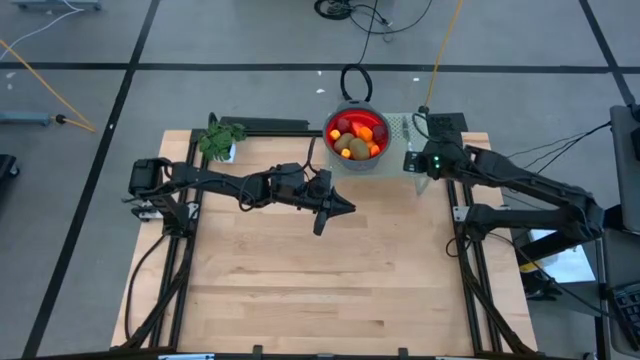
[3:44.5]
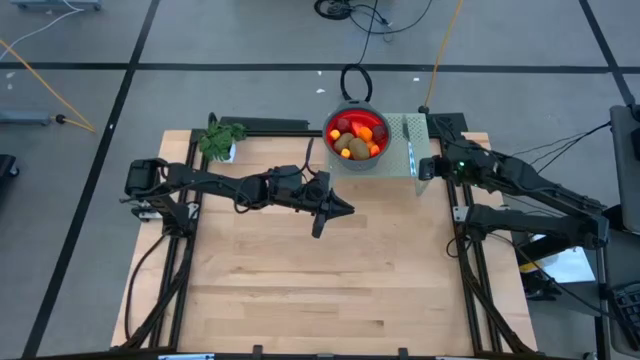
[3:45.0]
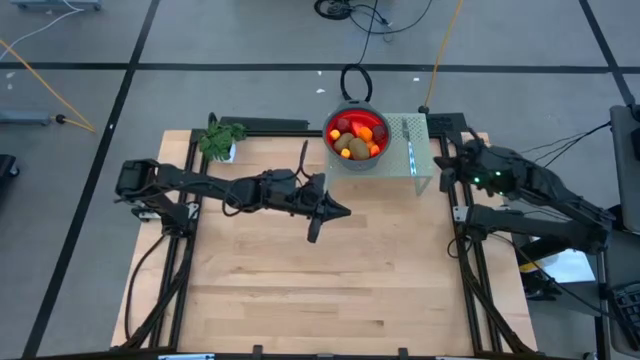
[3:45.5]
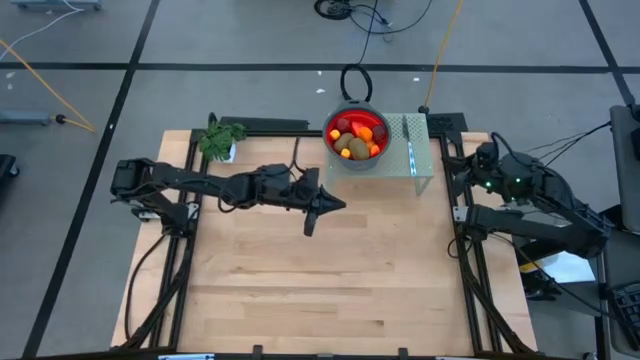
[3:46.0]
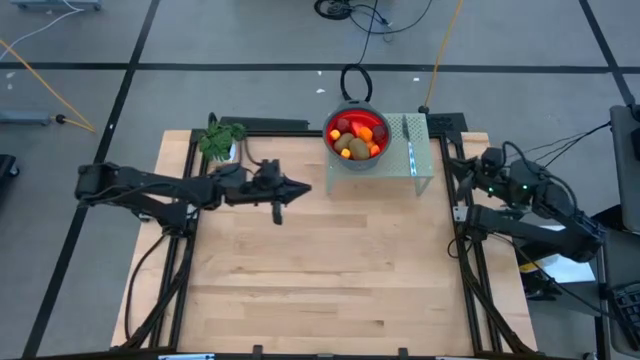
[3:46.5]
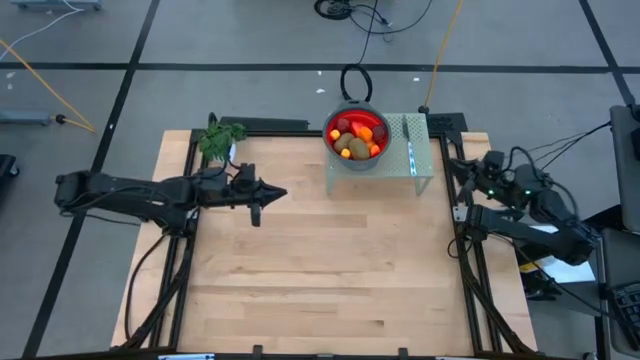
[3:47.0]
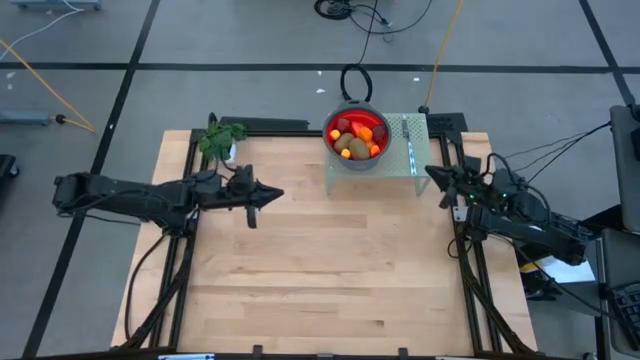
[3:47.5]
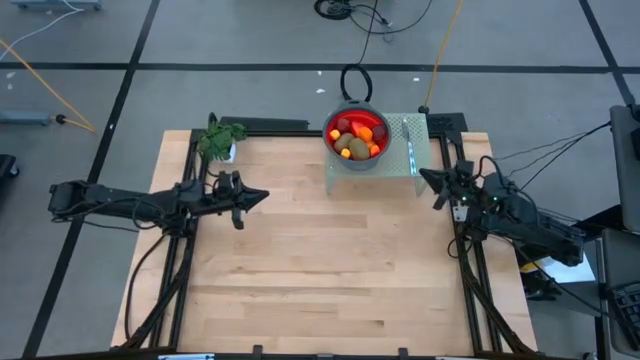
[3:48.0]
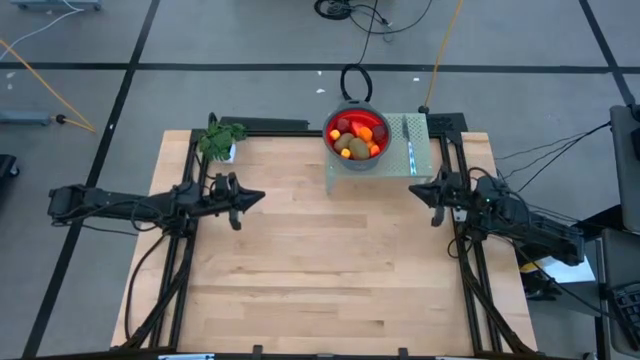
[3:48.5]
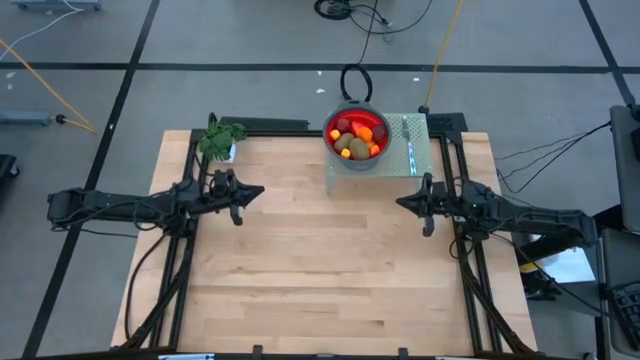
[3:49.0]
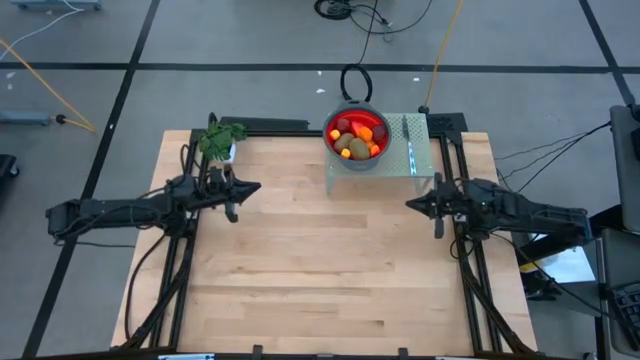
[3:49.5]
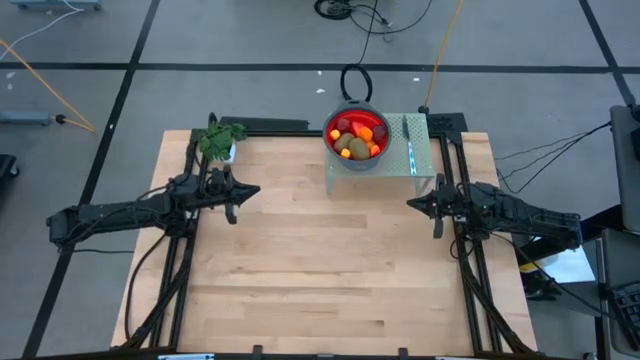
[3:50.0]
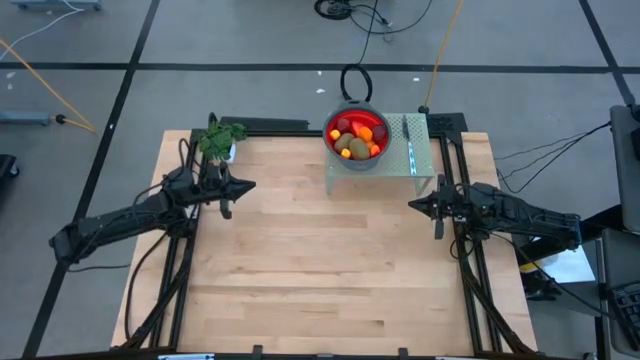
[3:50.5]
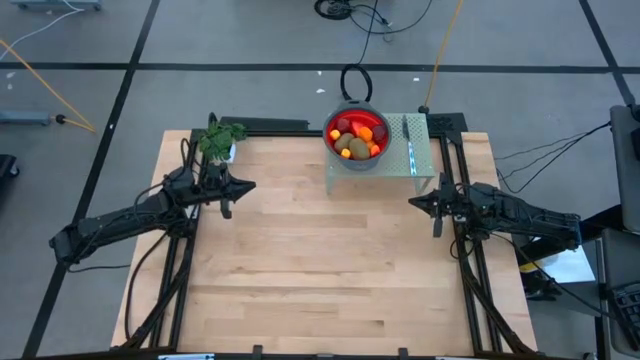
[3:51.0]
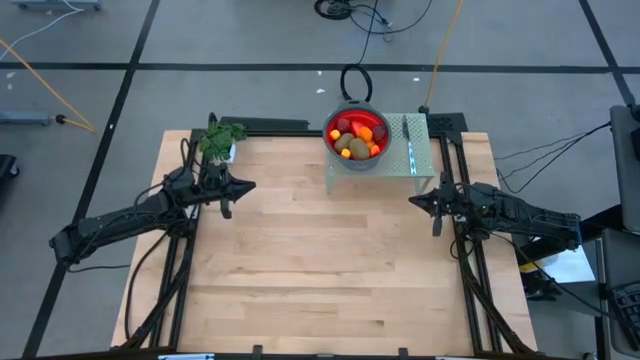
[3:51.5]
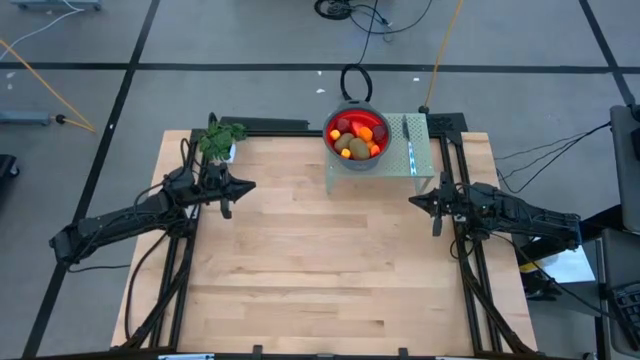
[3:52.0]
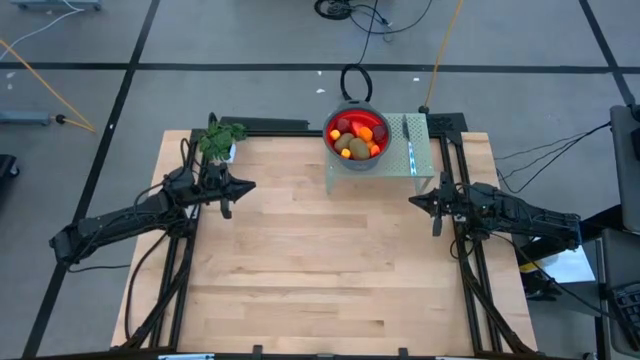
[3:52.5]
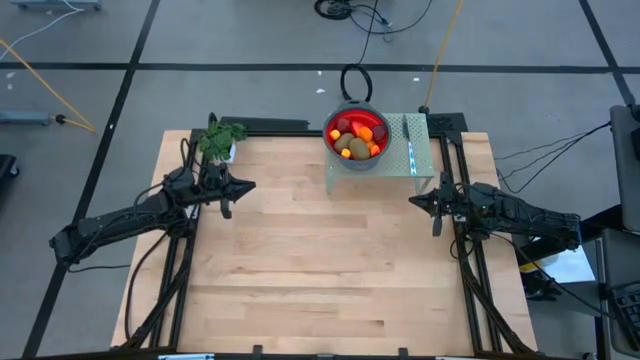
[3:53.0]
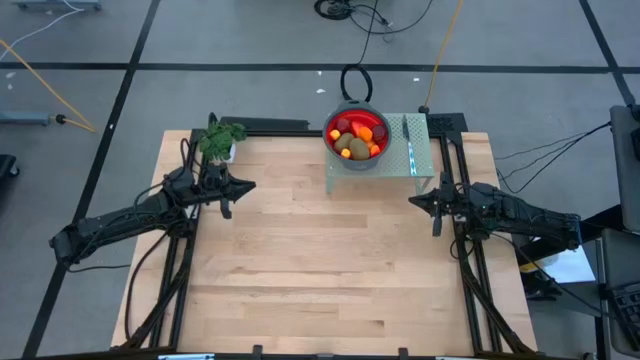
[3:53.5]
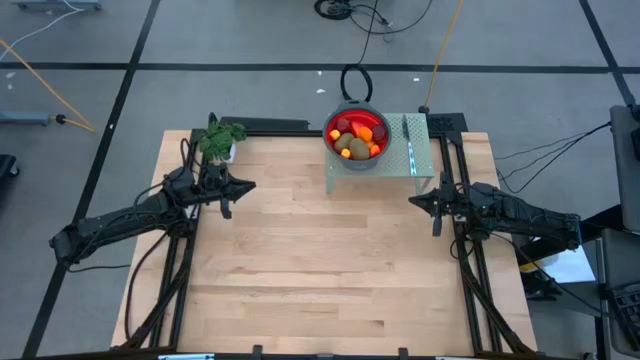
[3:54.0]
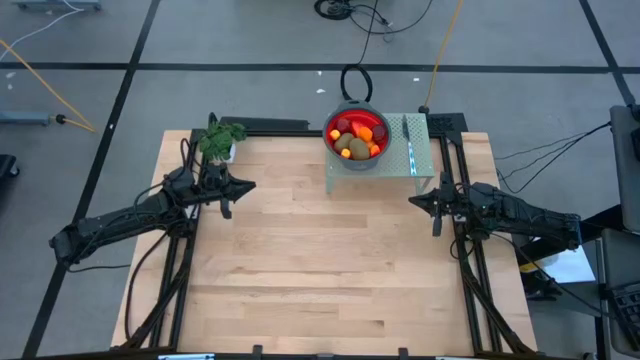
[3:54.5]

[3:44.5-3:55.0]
Task: Pick & Place Fruit
Return to Home Position

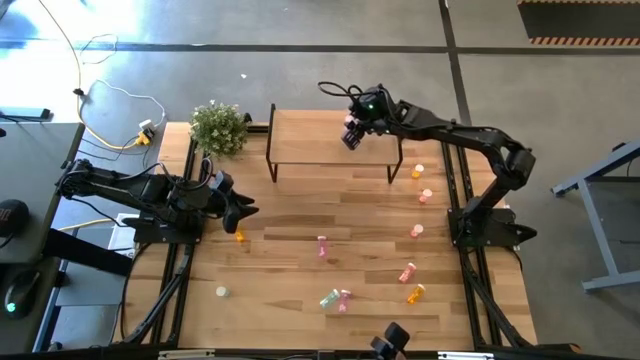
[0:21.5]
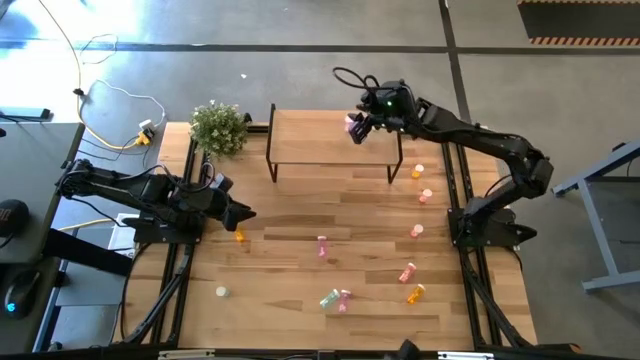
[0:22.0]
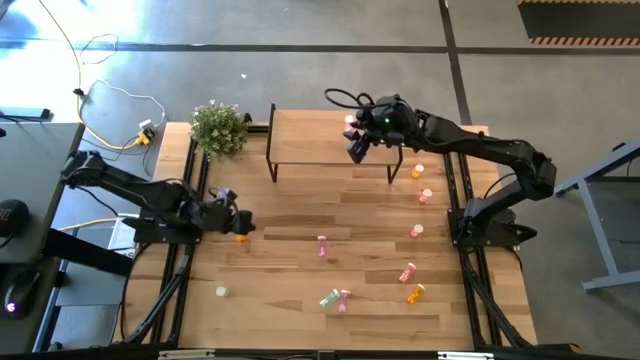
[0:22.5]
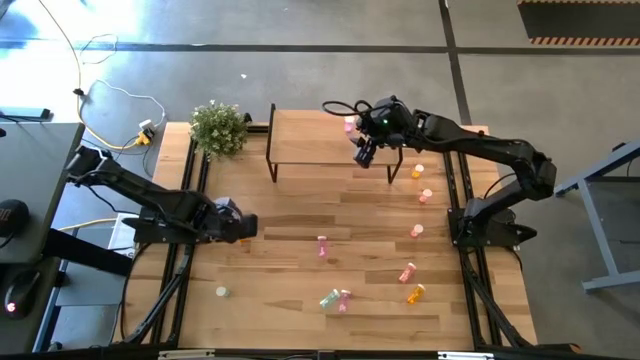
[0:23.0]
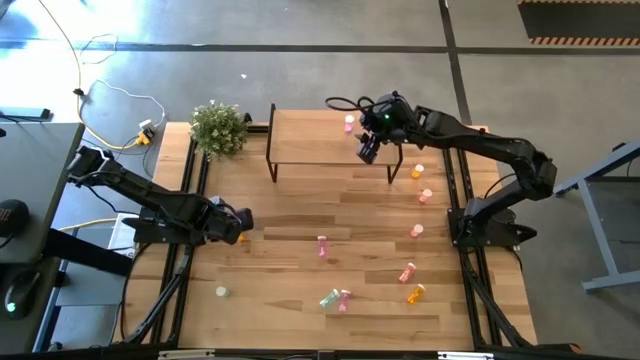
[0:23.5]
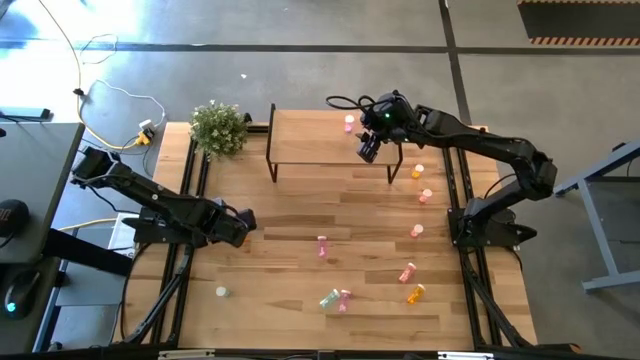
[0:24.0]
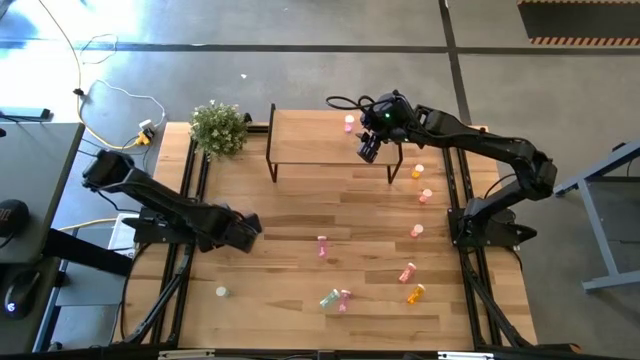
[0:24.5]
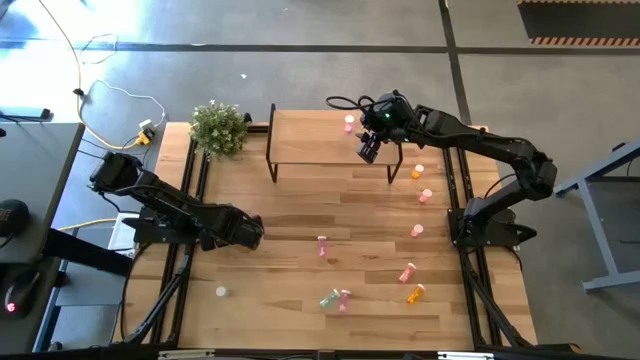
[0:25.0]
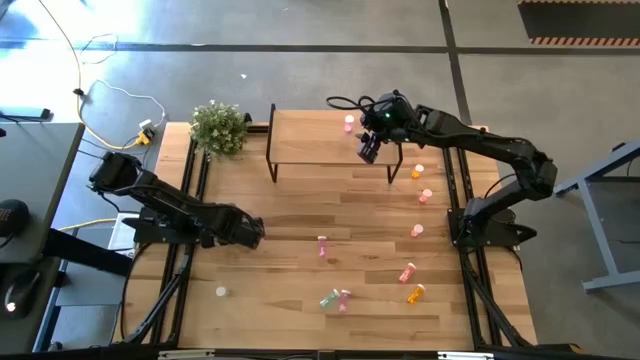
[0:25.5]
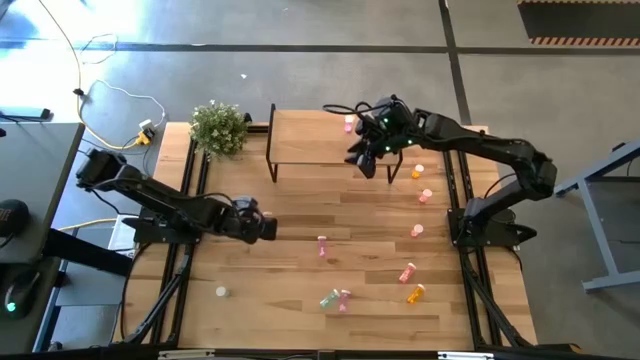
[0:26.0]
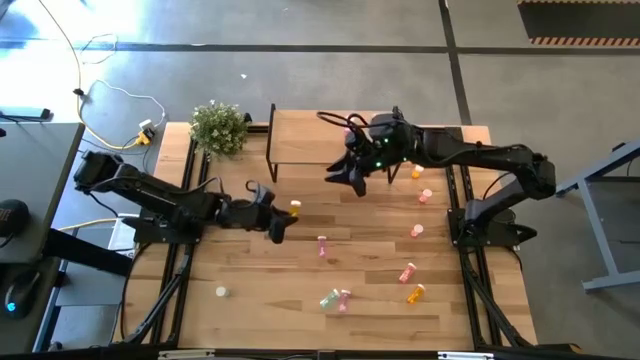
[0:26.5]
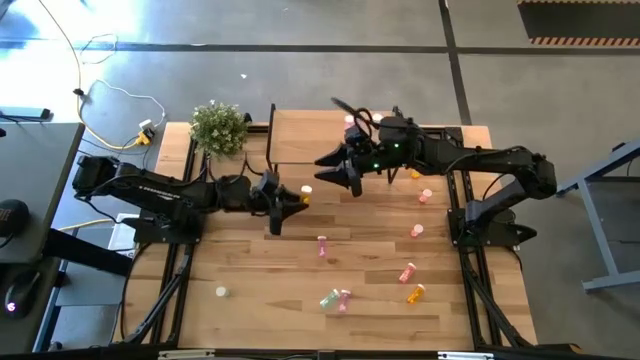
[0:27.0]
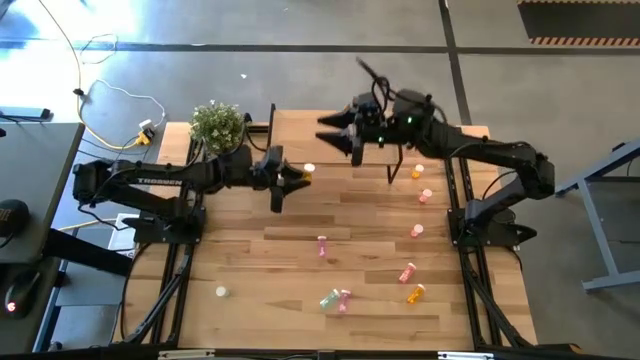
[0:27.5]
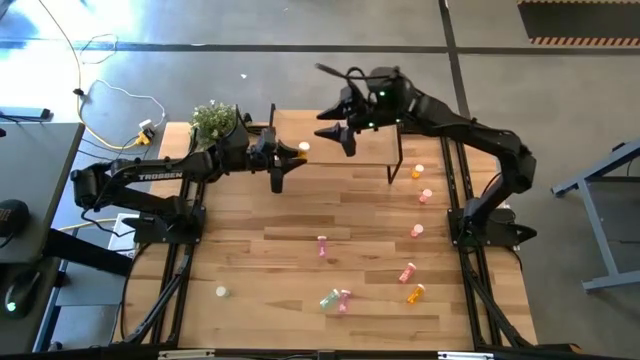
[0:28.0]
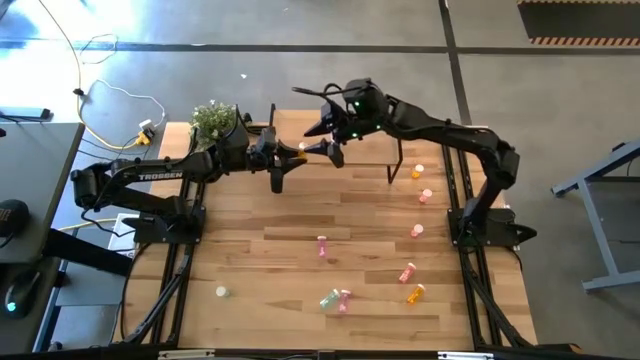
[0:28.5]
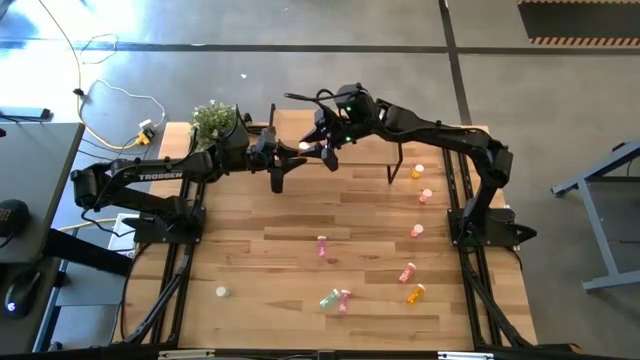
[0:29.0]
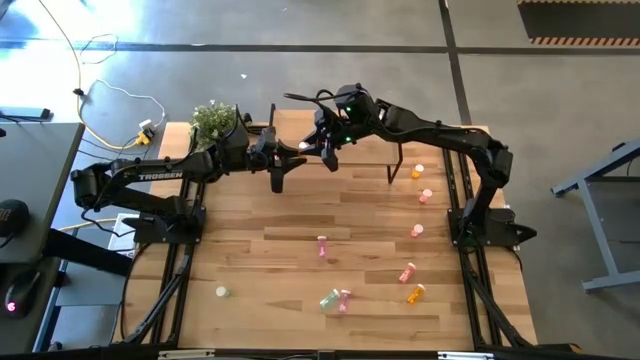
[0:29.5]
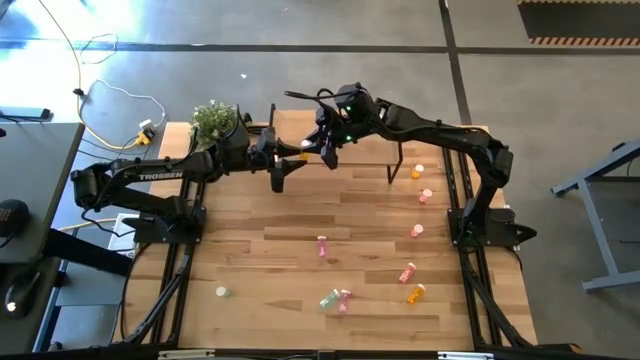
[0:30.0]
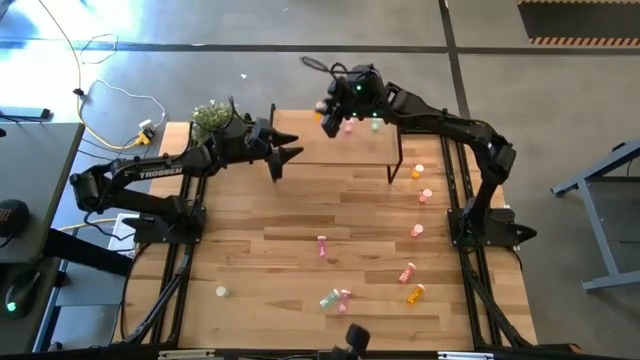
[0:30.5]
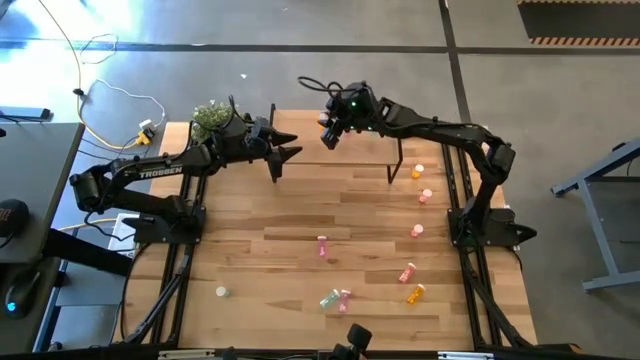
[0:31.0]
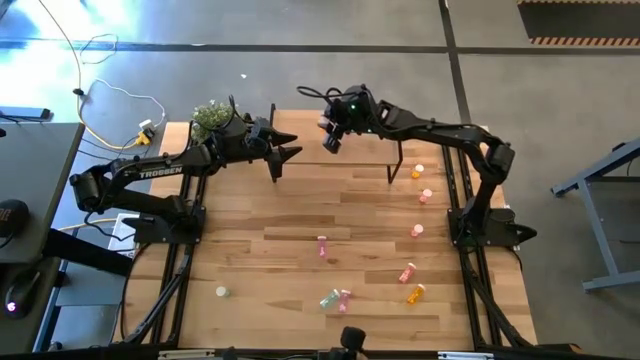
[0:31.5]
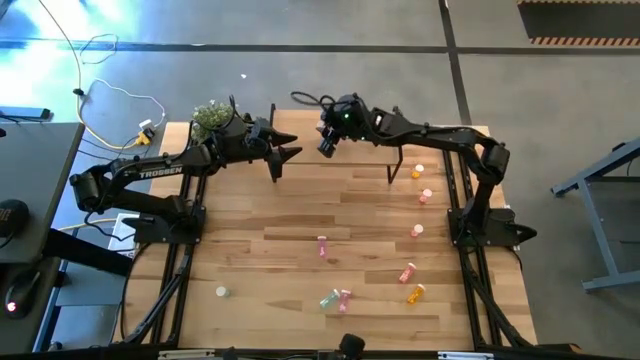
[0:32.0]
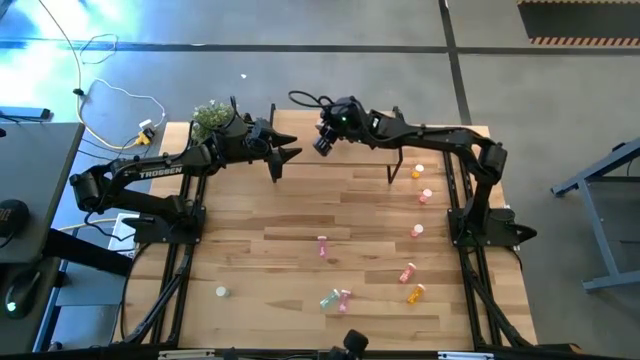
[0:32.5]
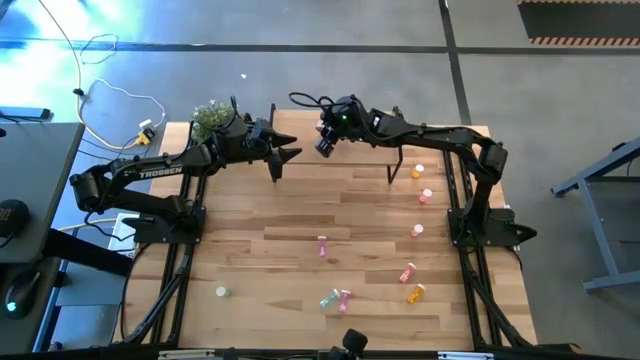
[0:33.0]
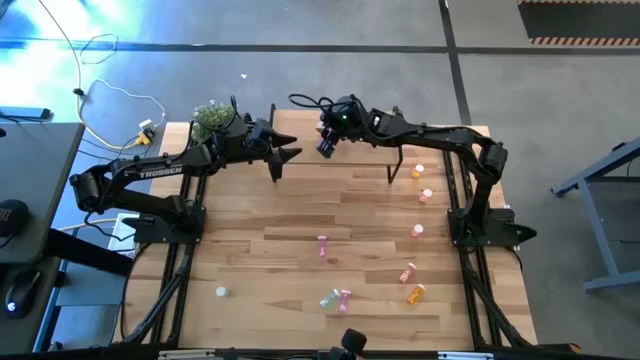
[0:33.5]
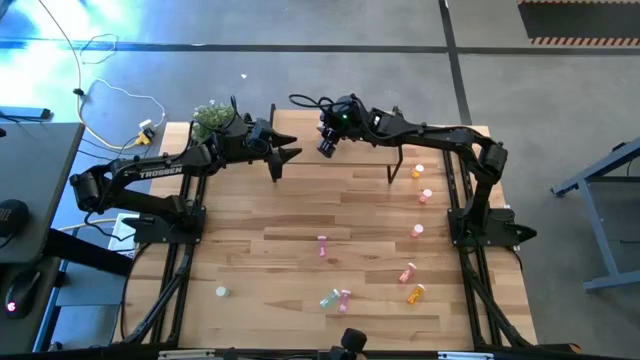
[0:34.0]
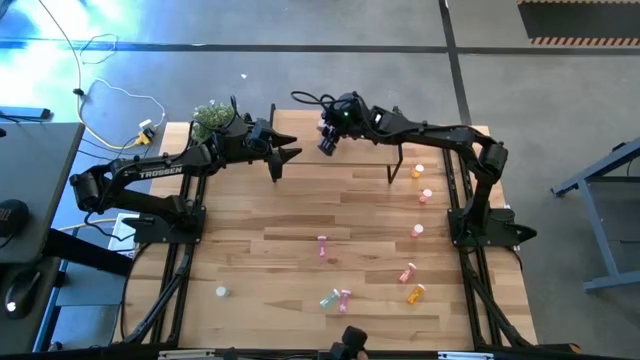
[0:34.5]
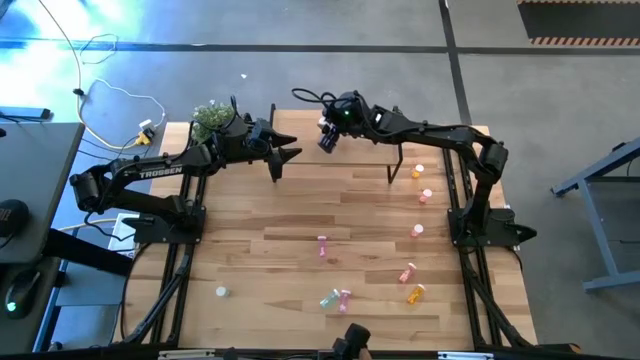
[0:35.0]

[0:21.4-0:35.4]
Task: Pick and place medicine bottles onto shelf by color
Put the middle orange pill bottle on the shelf
